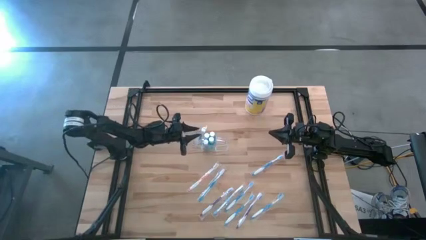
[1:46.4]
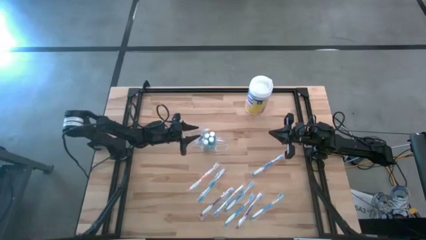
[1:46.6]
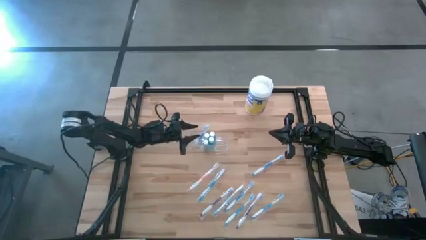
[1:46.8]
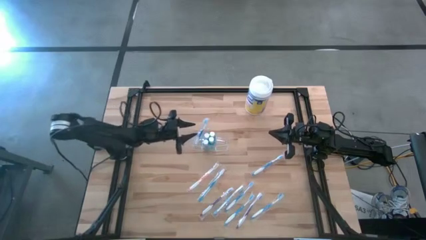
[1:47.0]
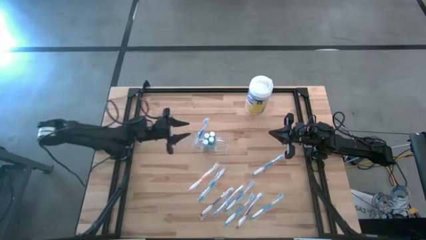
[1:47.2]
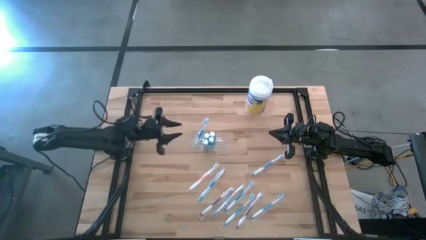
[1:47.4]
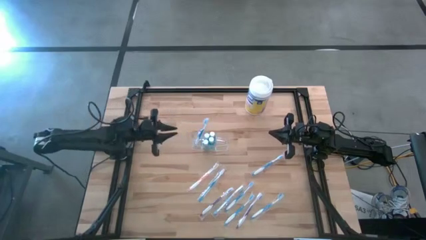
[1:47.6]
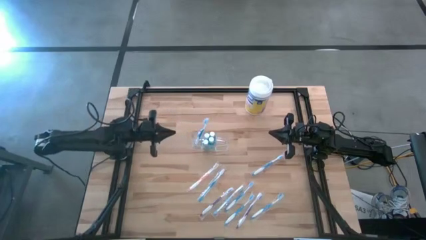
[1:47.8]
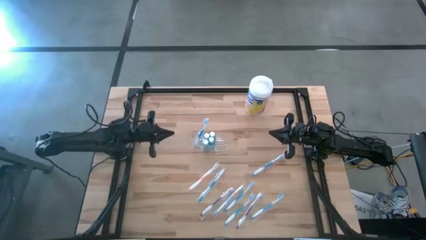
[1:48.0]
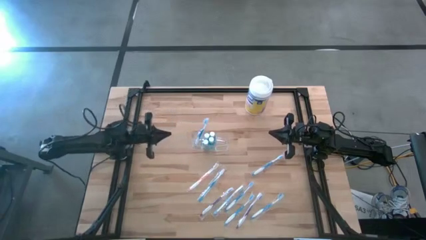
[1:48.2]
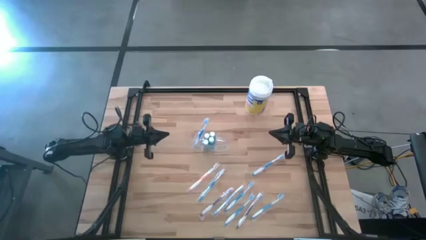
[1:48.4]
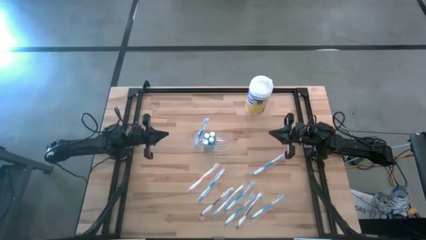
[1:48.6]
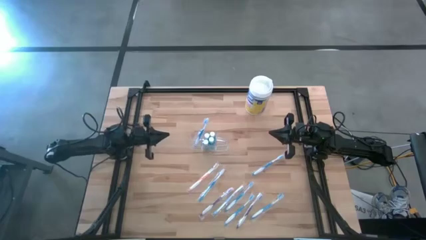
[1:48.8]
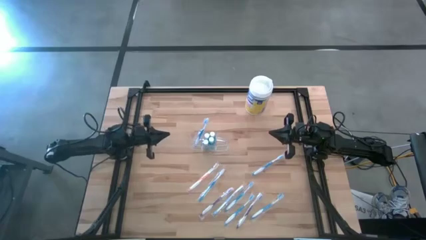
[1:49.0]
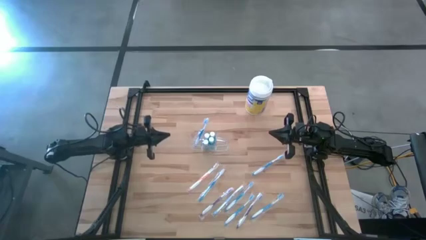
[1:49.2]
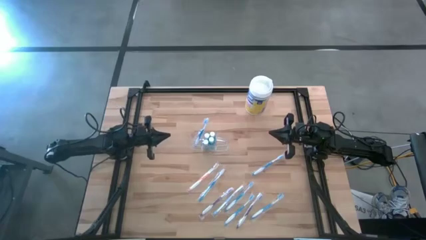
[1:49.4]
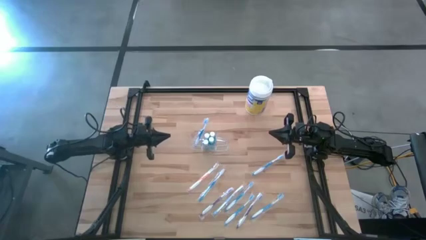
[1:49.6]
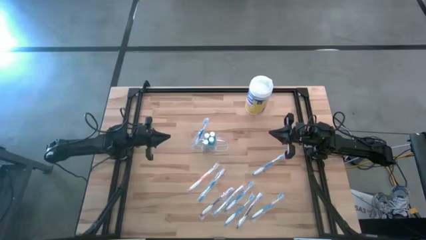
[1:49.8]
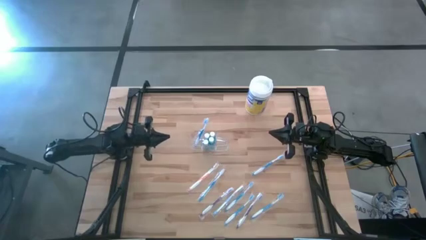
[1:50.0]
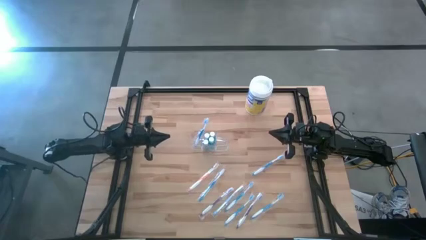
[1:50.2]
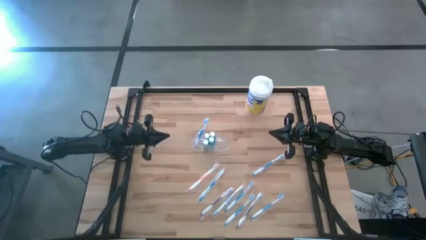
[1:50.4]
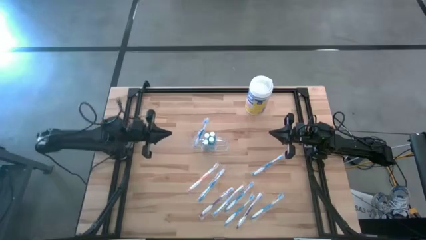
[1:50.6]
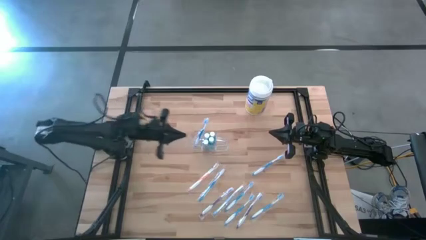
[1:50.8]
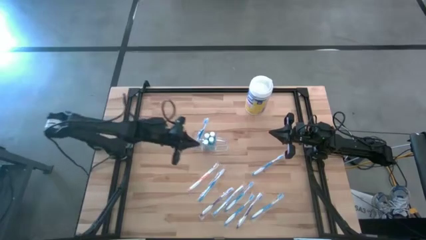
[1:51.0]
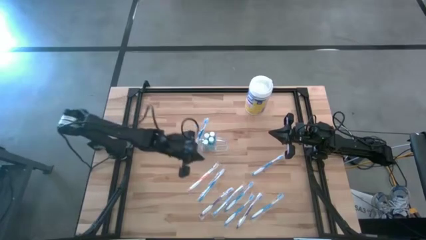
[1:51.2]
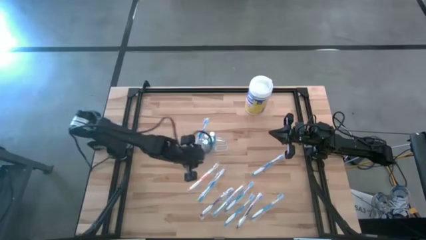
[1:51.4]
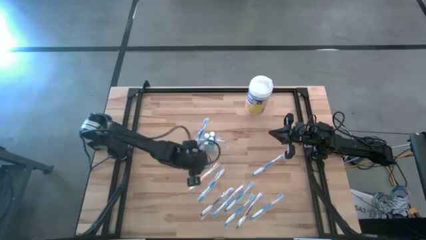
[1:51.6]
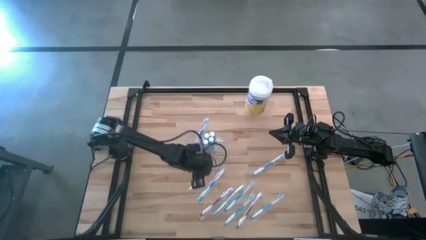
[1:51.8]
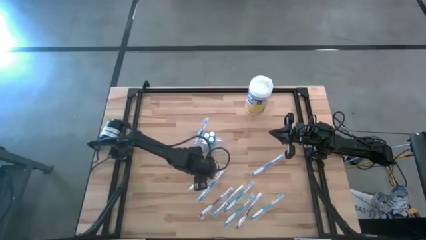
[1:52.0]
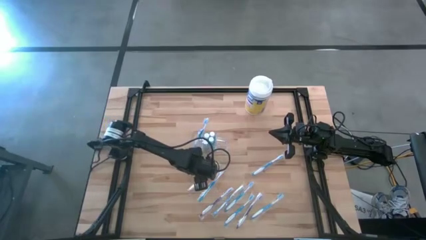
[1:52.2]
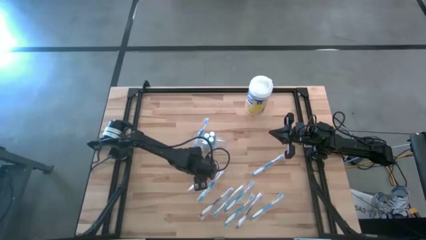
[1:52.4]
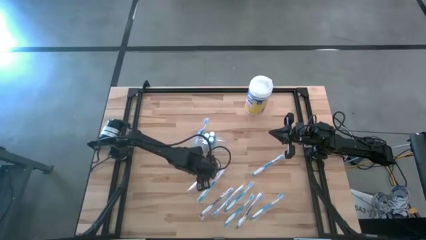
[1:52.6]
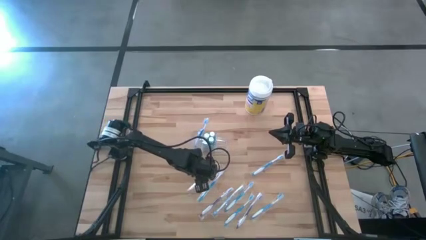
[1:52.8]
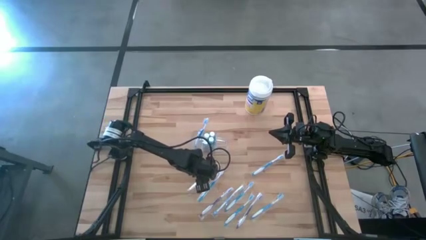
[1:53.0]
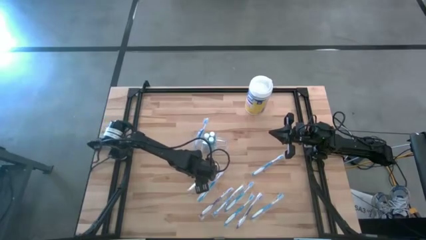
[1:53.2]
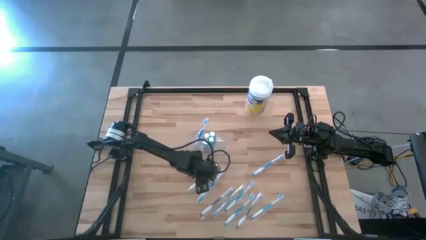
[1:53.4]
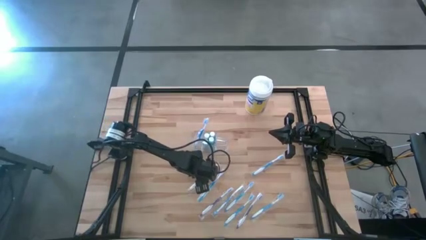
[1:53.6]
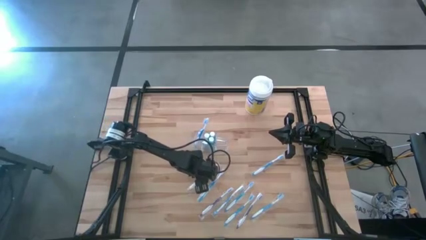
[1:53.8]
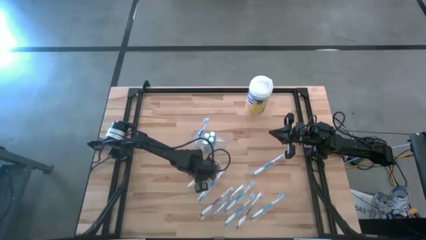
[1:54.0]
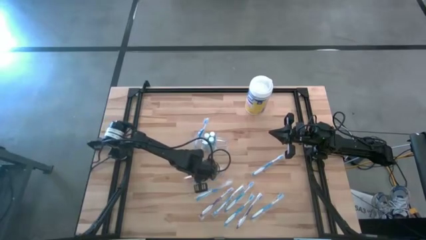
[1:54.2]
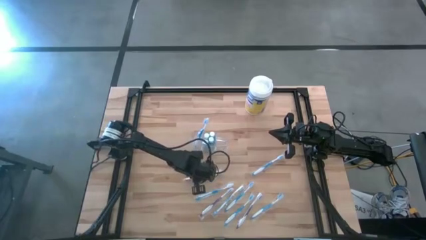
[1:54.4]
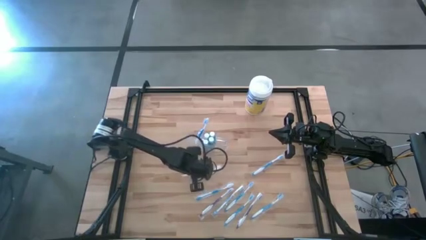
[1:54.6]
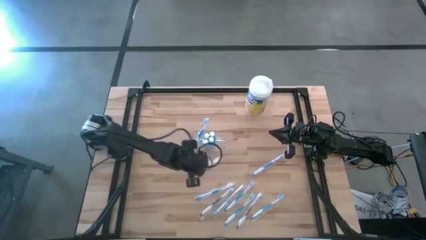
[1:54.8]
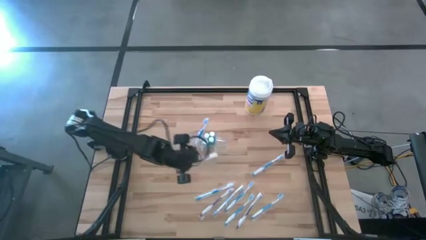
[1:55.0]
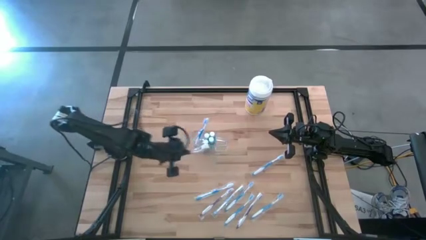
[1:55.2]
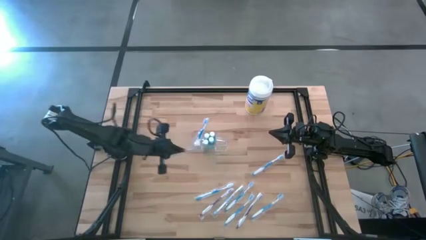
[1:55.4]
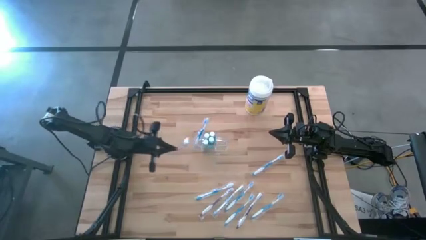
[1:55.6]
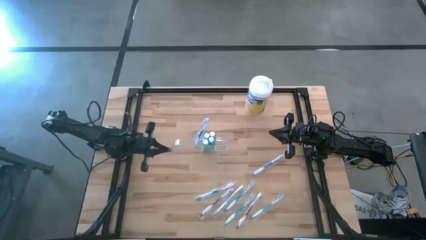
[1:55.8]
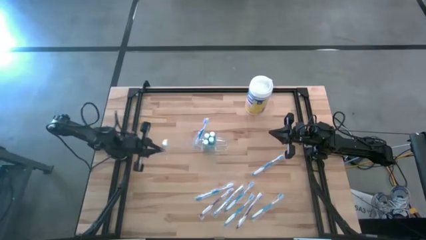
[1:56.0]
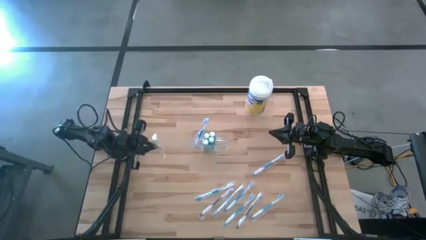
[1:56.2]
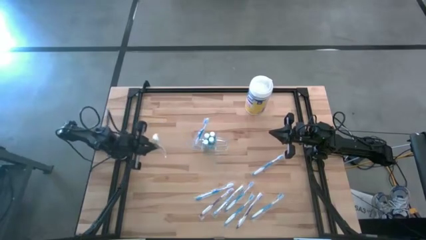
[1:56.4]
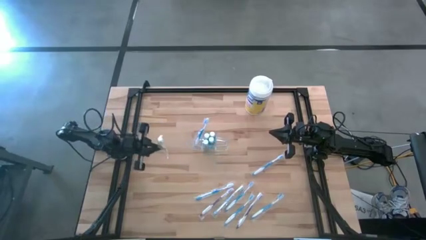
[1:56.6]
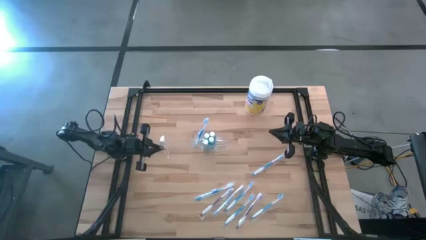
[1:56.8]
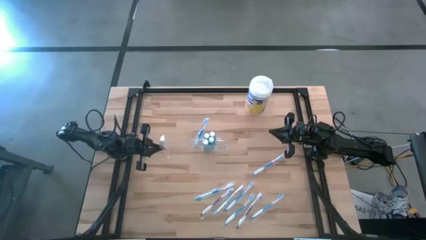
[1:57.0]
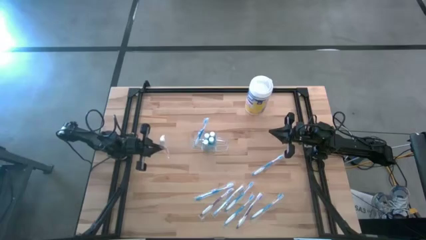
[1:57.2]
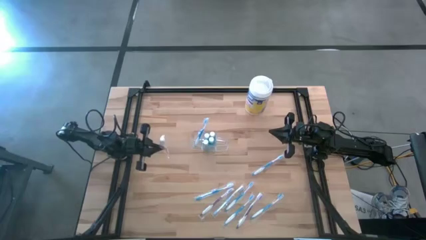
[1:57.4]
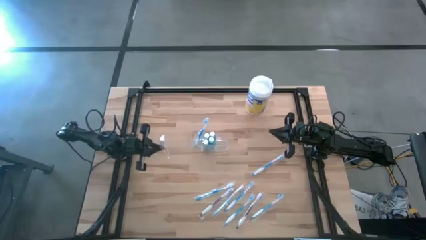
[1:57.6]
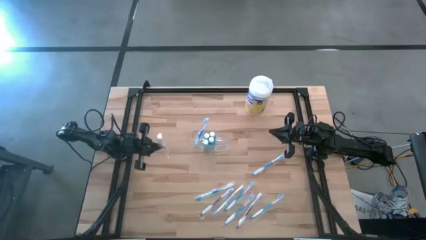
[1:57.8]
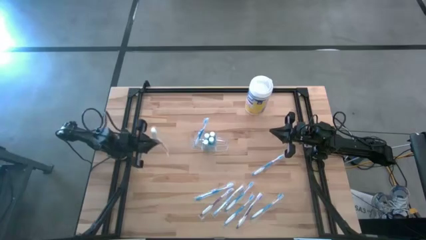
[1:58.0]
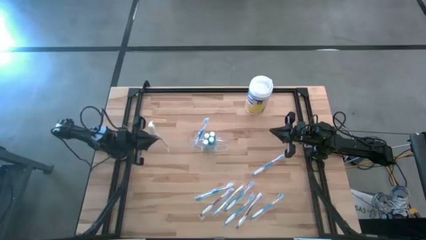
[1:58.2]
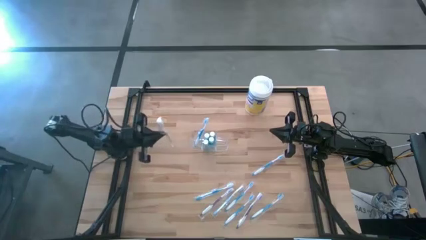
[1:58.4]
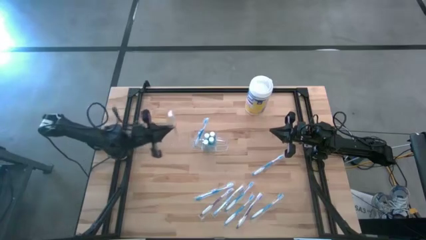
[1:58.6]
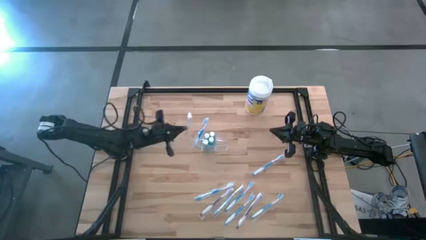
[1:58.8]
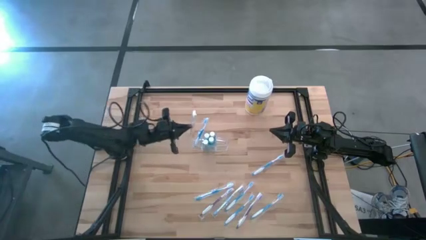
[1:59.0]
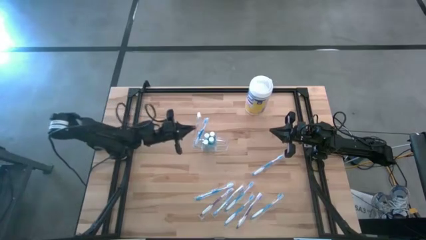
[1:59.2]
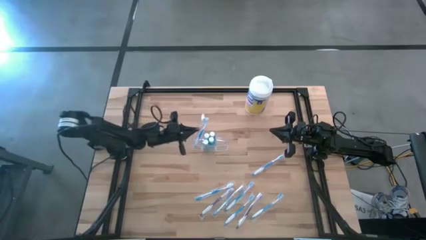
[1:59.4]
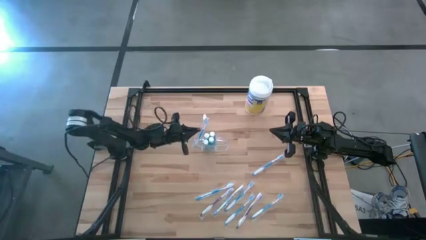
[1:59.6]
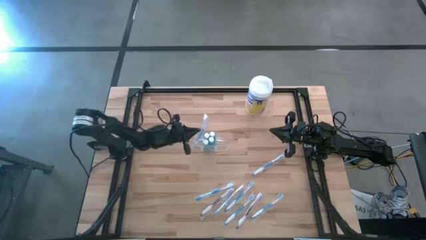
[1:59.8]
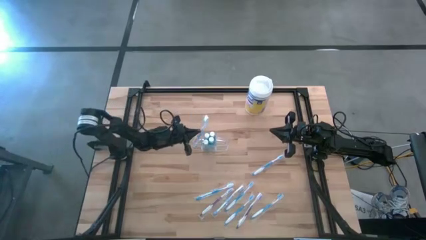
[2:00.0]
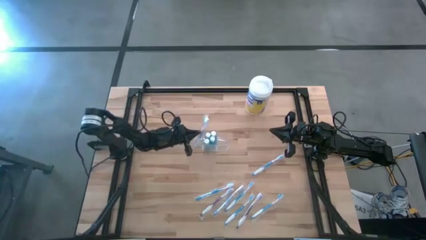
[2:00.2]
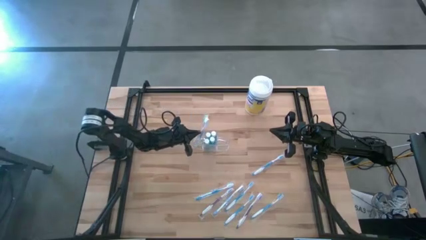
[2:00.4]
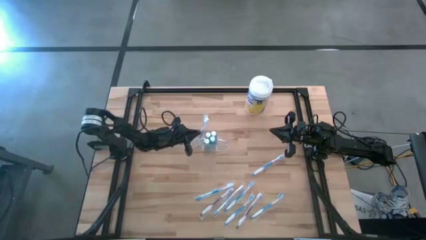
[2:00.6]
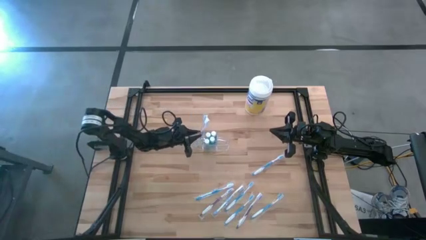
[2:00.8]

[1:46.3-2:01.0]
Task: Pick & Place toothbrushing station
Put the orange toothbrush into the transparent organizer

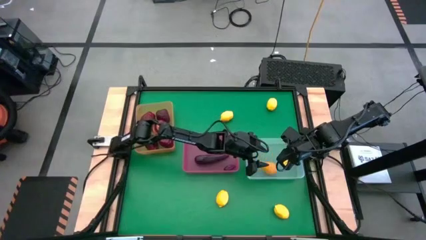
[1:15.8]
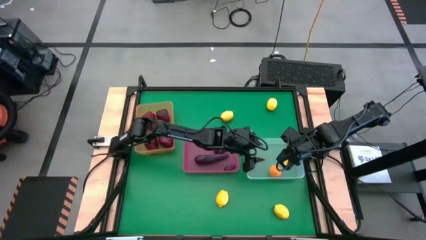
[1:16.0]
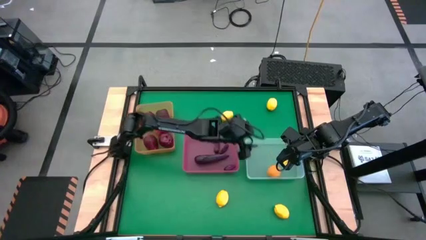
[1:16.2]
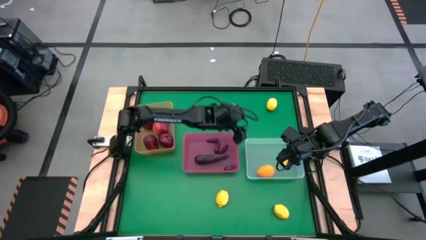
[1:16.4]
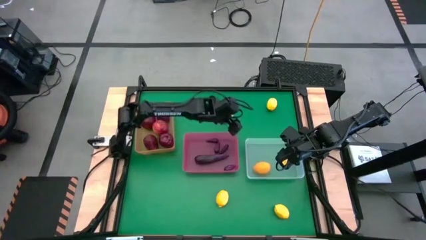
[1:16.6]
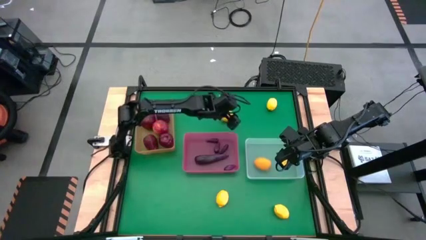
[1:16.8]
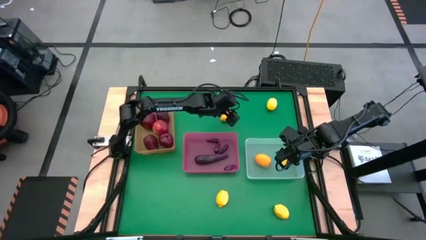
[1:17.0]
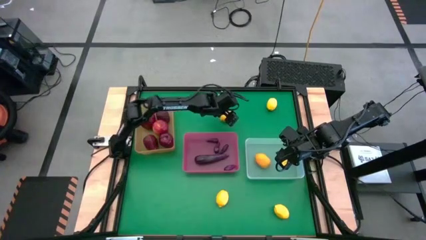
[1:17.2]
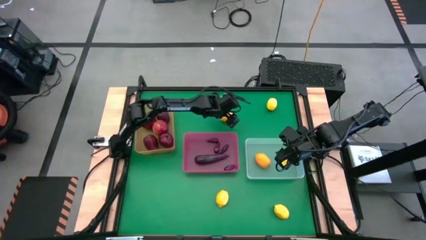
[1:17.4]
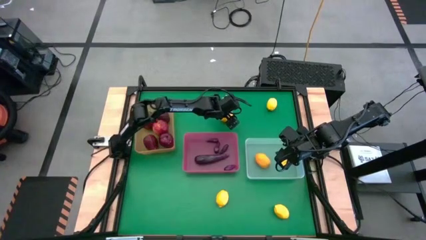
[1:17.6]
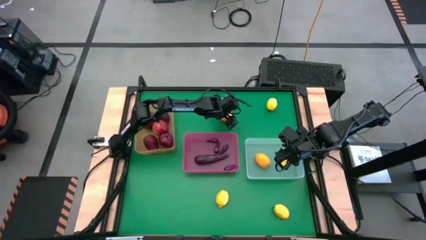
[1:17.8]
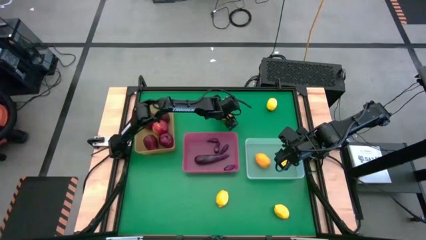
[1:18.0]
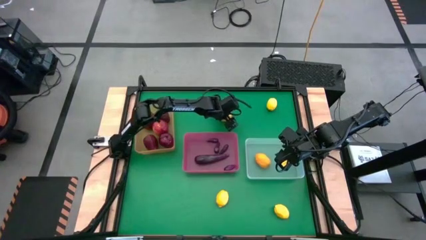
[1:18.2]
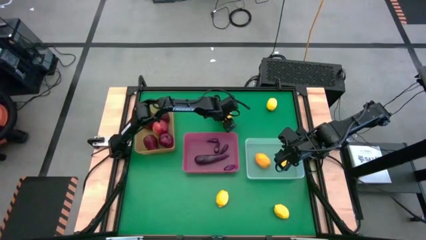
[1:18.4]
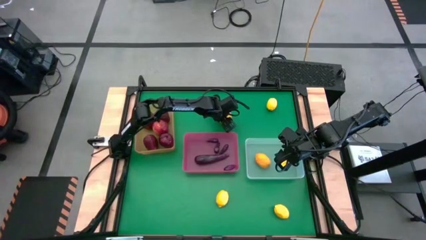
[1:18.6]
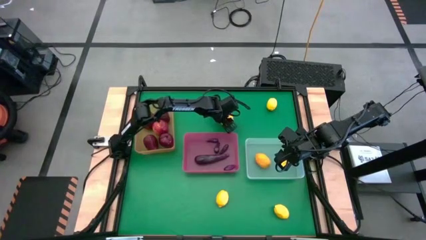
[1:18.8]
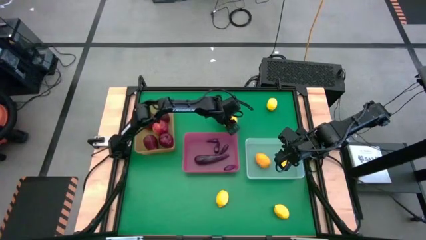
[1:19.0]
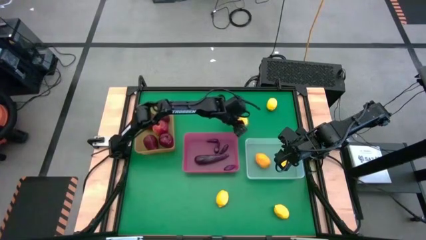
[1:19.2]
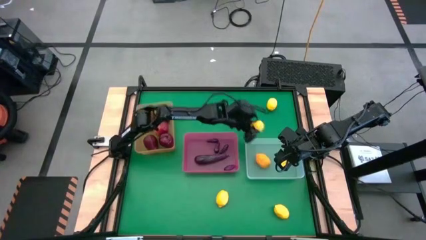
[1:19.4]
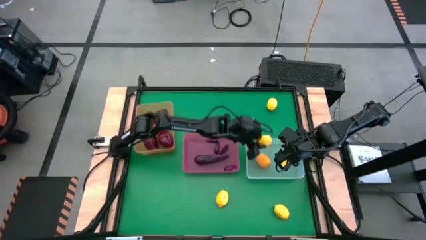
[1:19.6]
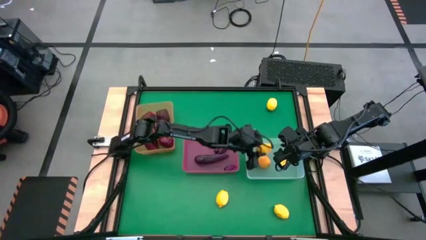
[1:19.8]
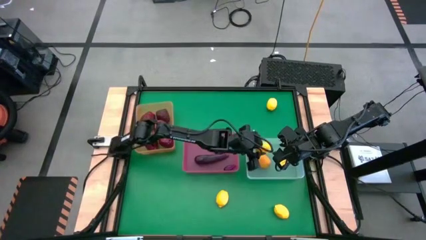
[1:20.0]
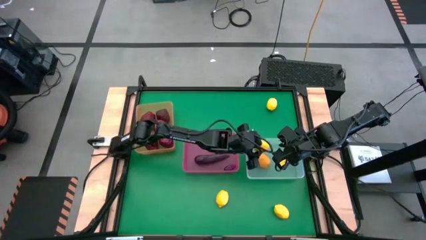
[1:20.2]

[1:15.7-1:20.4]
Task: Sort produce into baskets
Put the yellow lemon into the transparent bin
